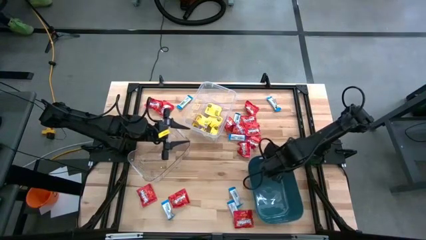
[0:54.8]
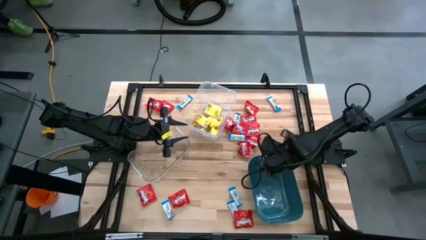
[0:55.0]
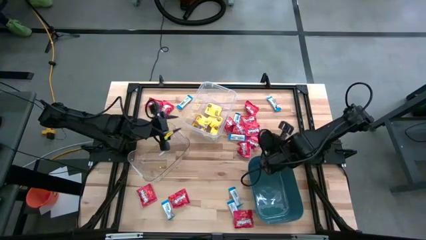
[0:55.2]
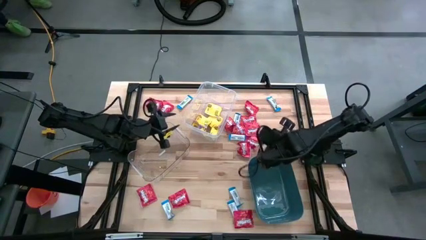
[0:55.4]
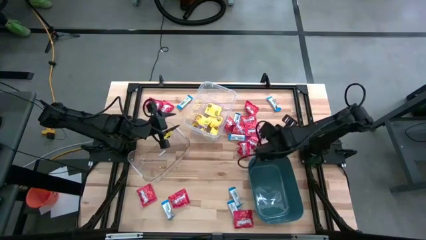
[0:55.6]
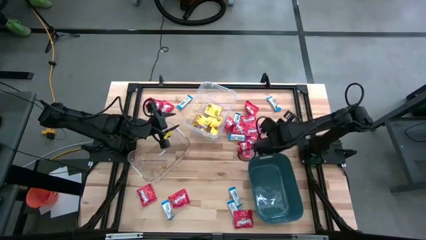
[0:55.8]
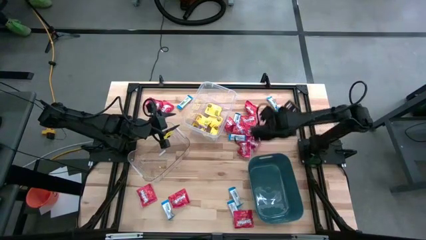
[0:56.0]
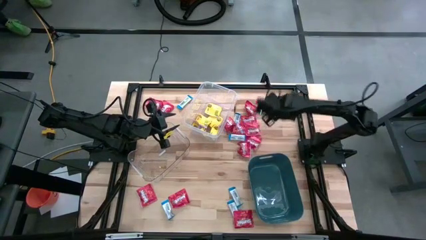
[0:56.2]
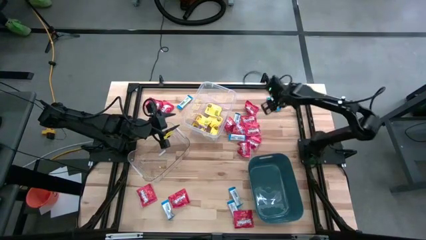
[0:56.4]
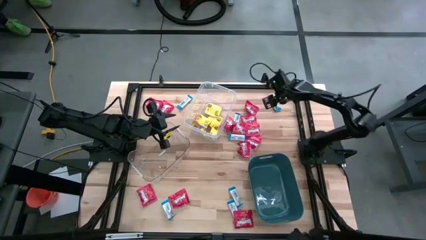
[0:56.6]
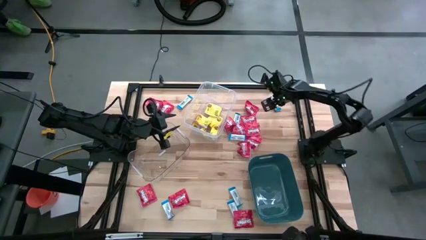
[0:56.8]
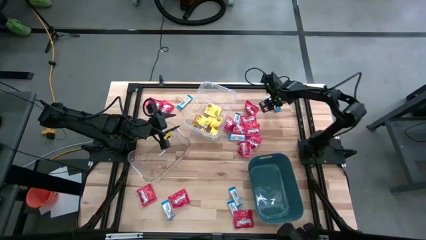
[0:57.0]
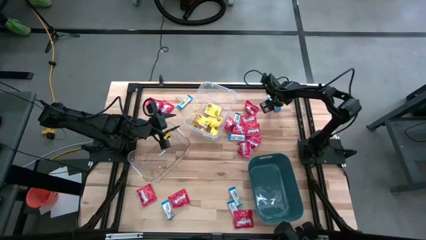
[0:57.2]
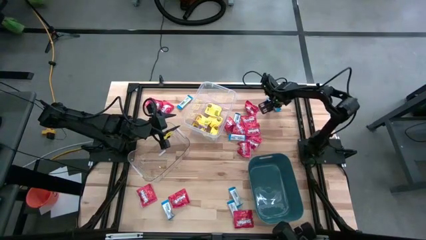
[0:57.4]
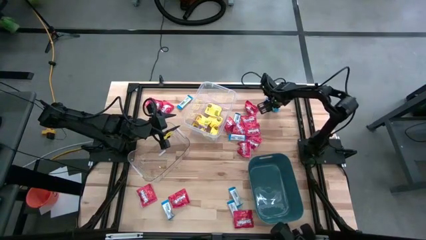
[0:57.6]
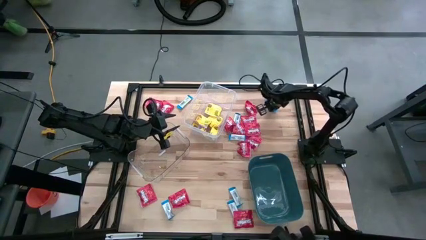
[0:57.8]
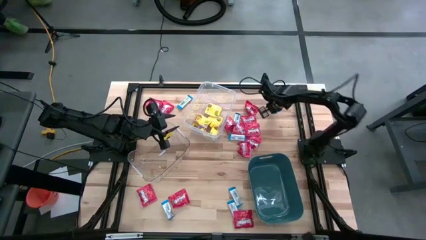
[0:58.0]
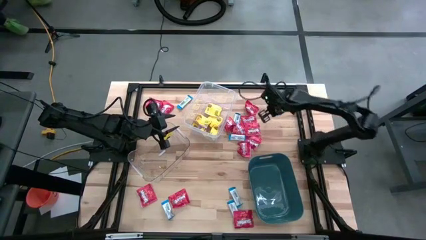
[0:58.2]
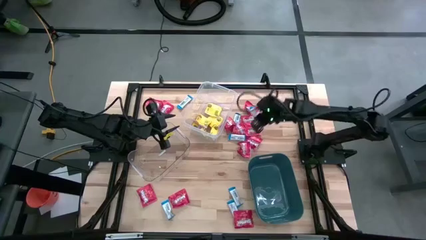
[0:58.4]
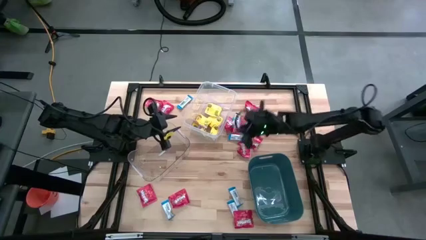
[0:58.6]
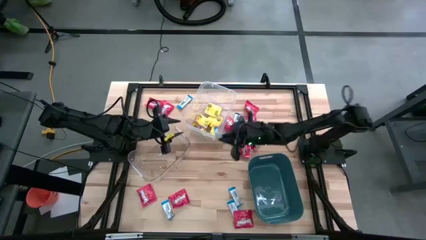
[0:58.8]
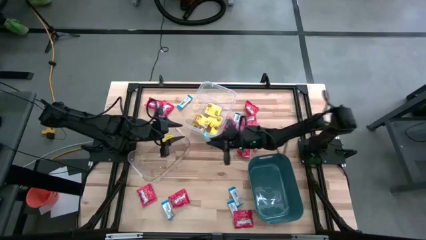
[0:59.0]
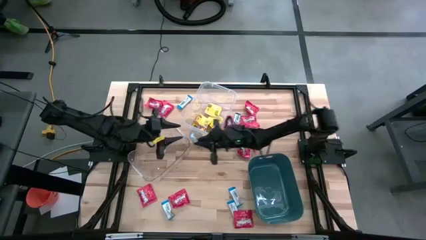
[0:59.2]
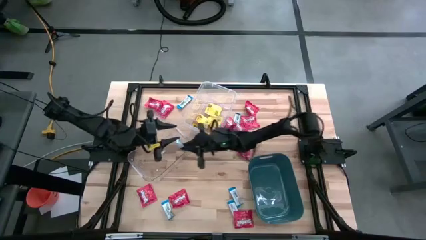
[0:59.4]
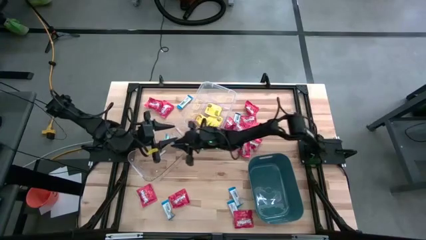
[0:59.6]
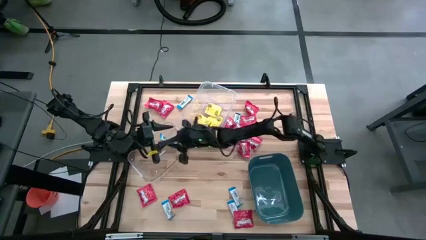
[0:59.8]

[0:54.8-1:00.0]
Task: Sort candy
Put the white chocolate into the transparent bin

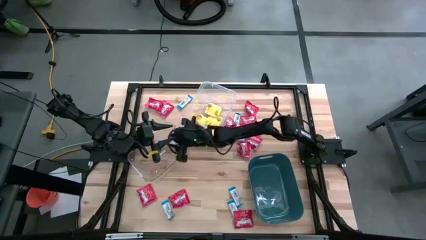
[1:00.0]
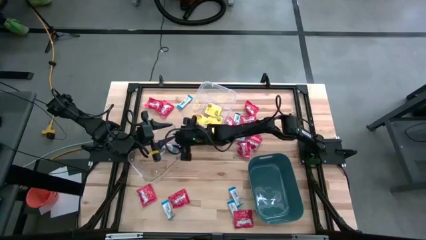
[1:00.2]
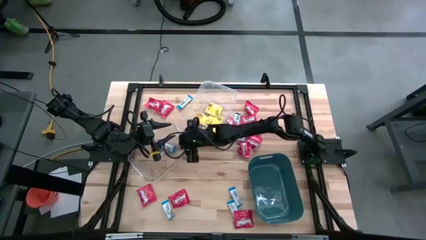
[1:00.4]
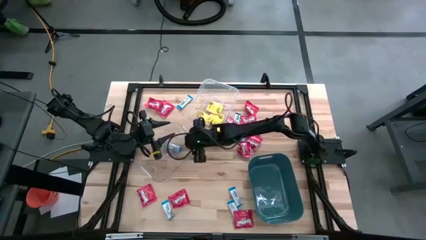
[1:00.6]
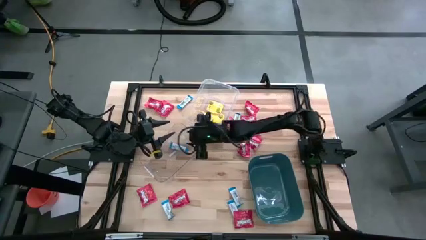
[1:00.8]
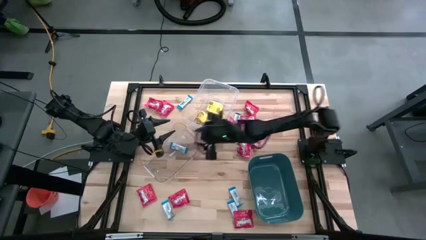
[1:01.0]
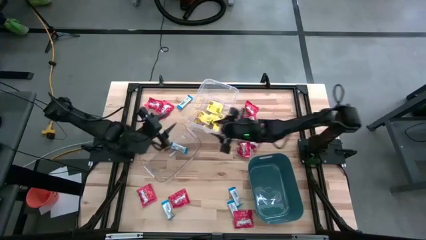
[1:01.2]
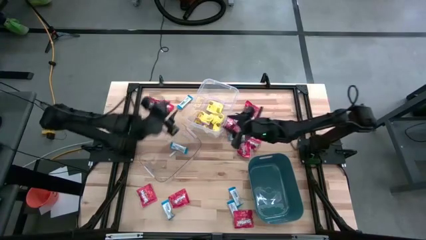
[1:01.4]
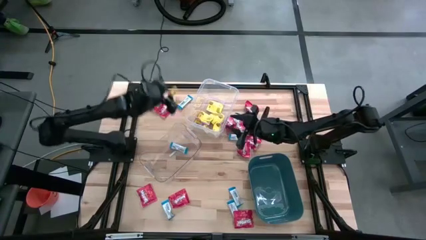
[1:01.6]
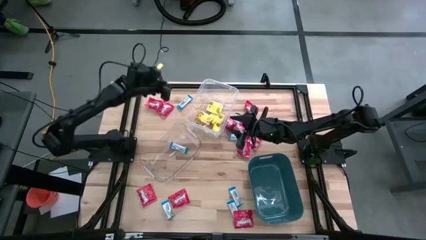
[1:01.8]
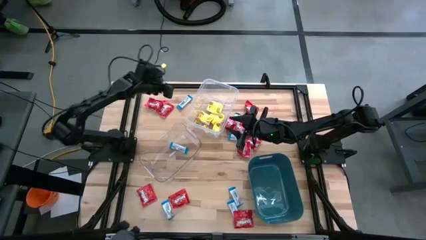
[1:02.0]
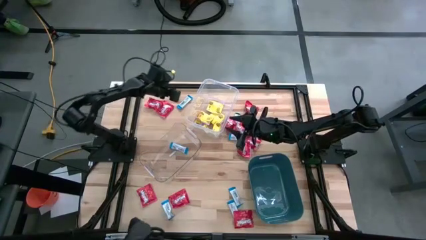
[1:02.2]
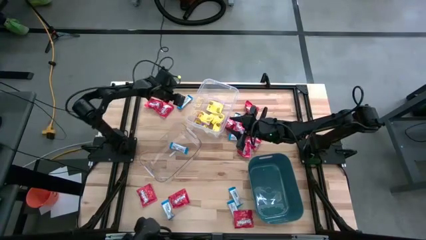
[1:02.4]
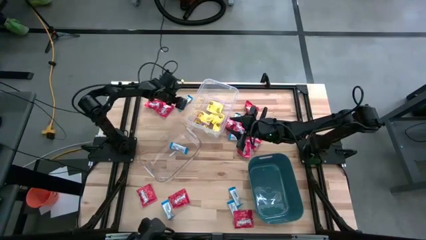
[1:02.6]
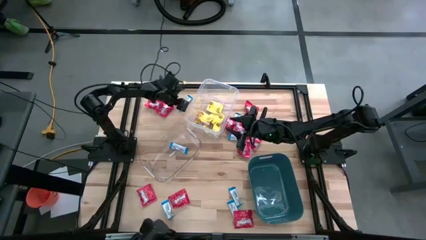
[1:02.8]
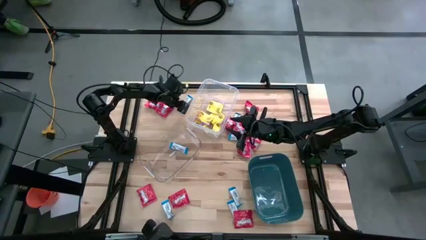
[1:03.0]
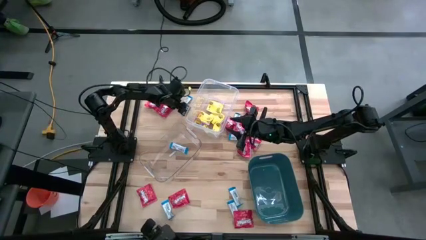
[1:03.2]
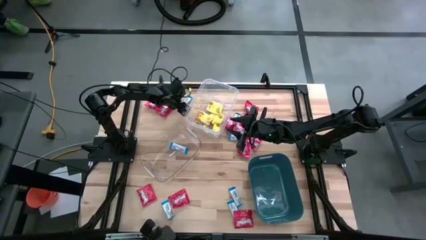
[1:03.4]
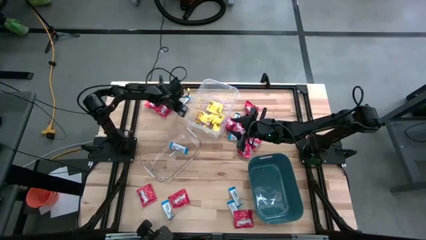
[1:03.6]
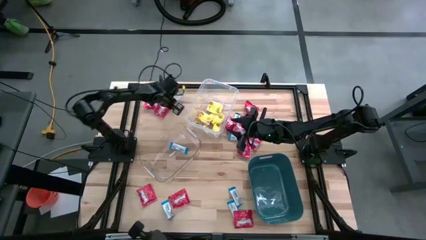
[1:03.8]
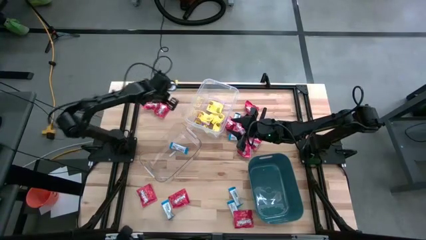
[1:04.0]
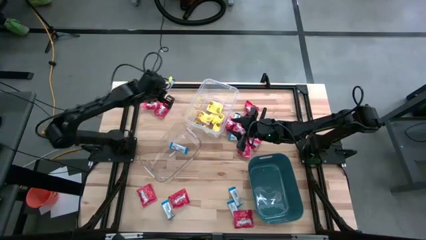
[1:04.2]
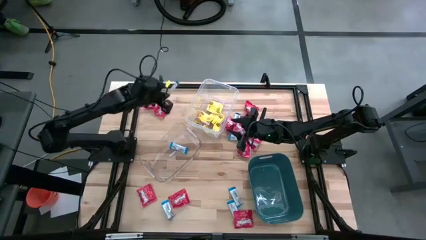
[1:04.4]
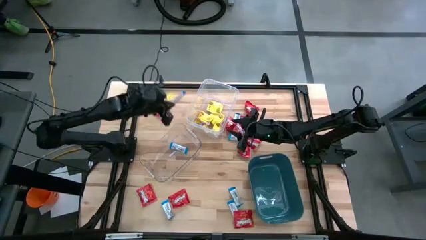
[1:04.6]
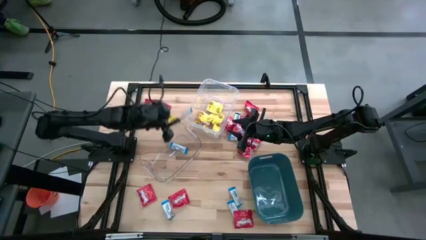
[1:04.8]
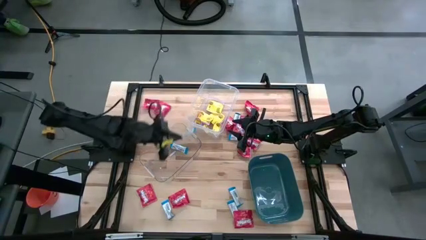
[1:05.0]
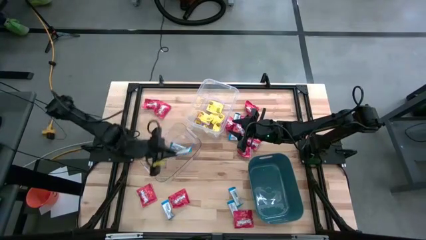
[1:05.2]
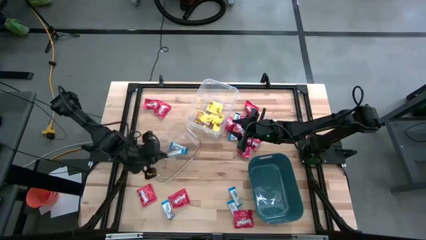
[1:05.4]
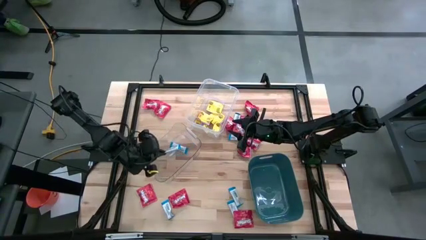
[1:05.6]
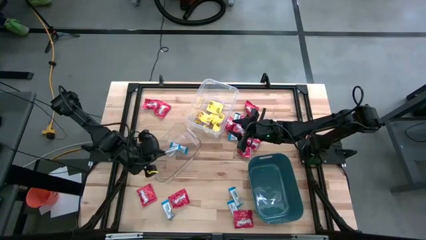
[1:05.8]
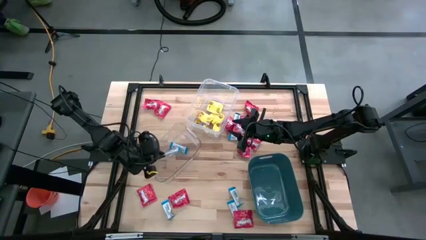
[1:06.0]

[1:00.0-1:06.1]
Put the white chocolate into the transparent bin

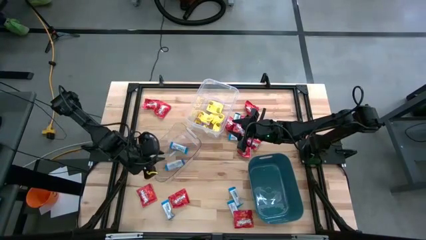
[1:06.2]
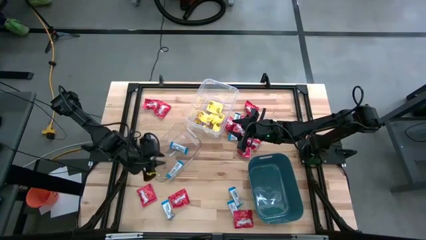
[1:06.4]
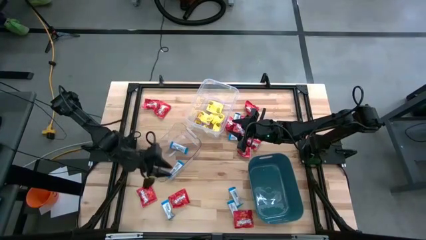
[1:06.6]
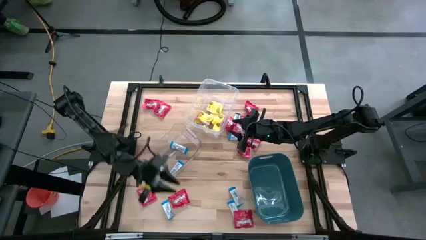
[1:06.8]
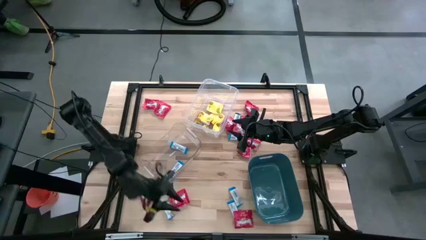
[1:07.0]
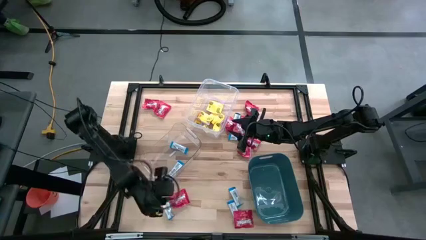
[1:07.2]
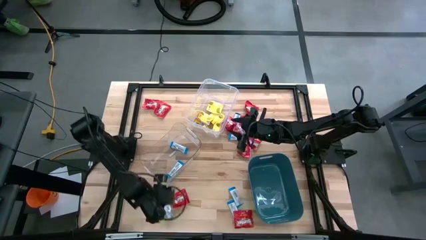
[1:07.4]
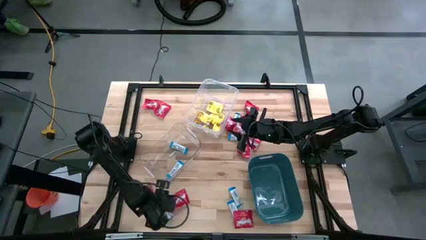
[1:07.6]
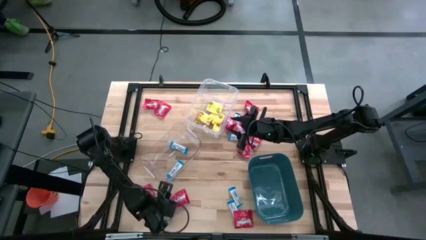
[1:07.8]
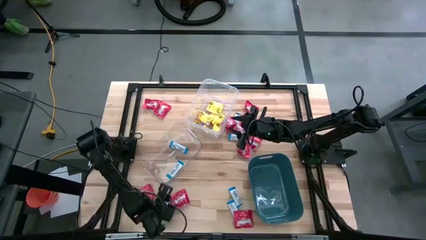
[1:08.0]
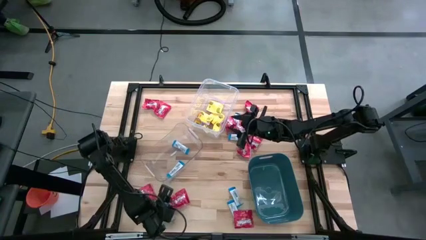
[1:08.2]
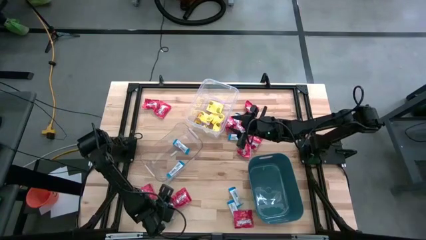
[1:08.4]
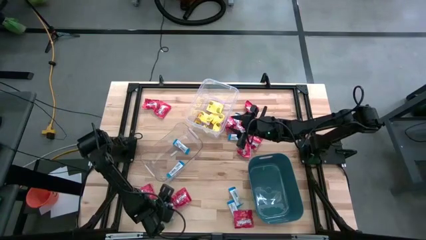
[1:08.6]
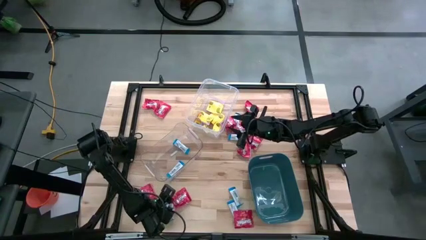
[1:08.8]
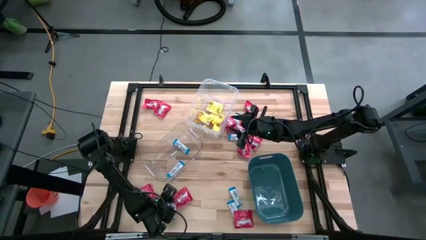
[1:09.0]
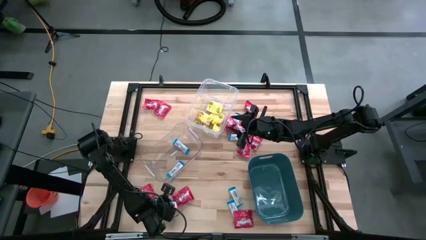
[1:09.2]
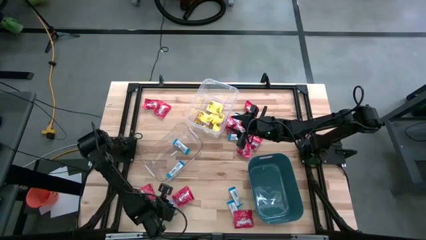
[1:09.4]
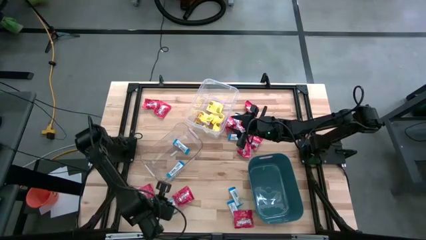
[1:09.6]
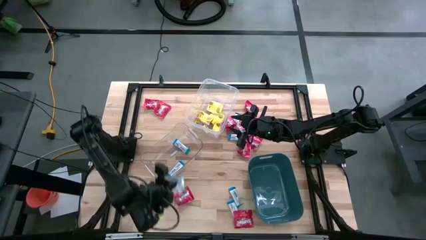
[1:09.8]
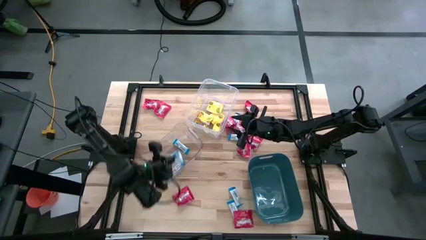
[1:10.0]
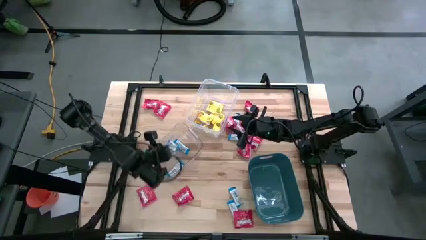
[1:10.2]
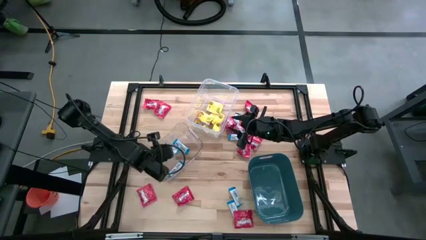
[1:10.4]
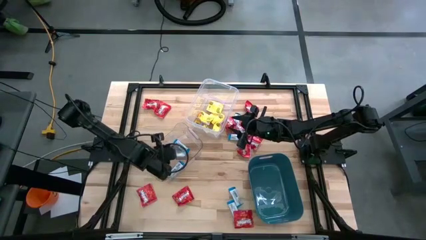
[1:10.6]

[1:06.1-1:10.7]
Put the white chocolate into the transparent bin
